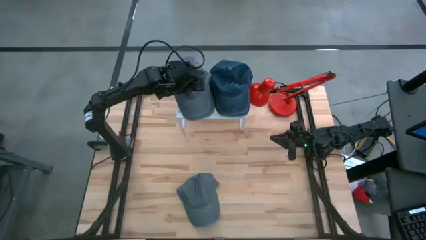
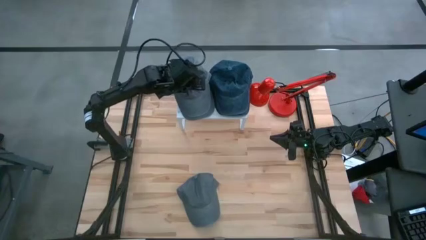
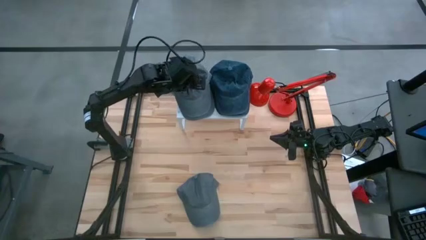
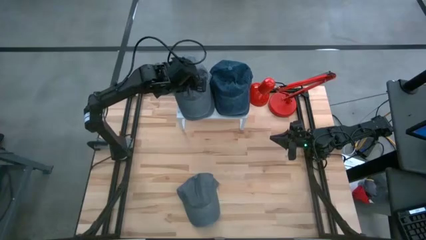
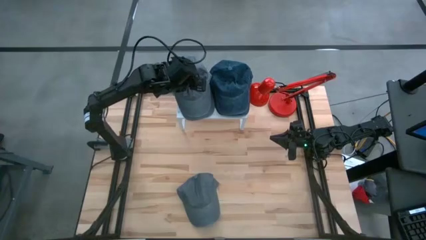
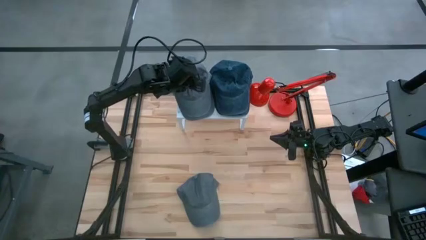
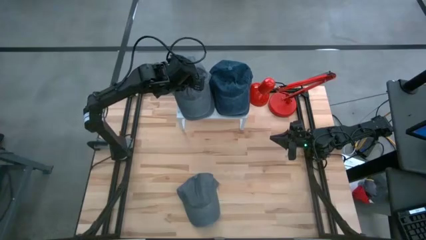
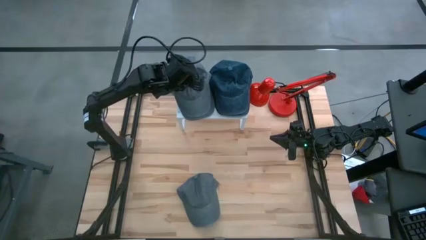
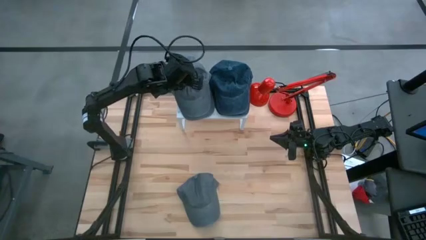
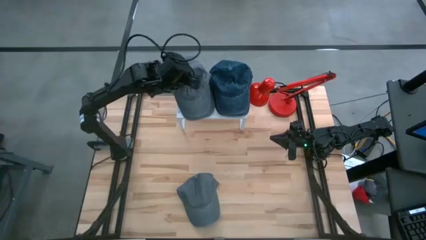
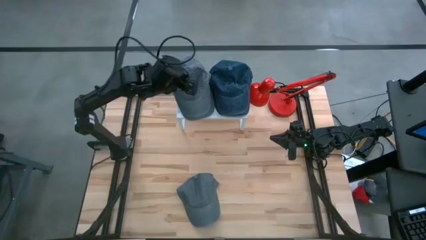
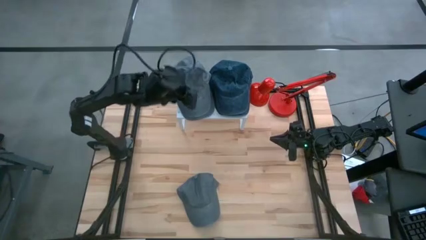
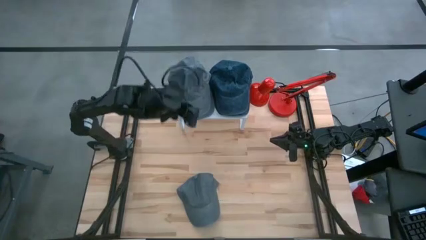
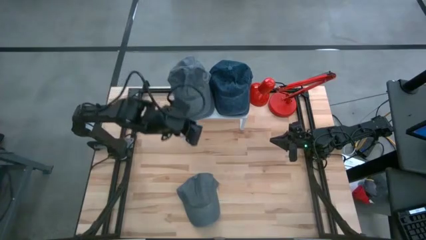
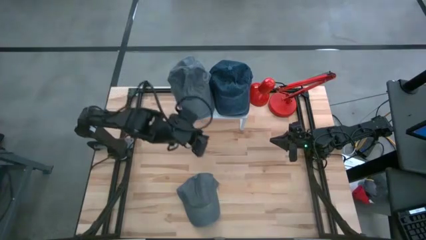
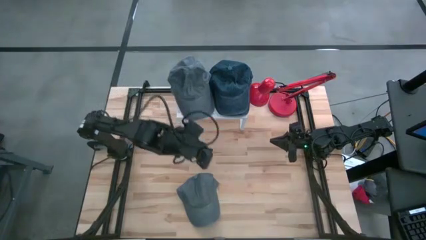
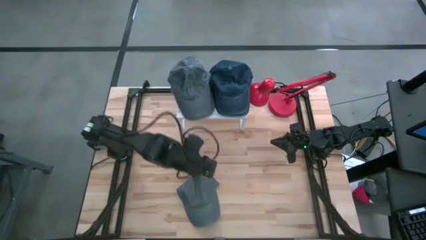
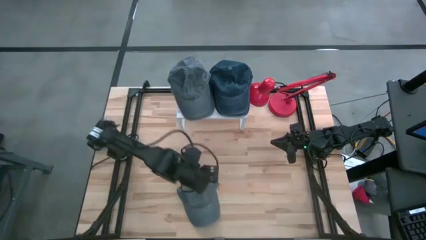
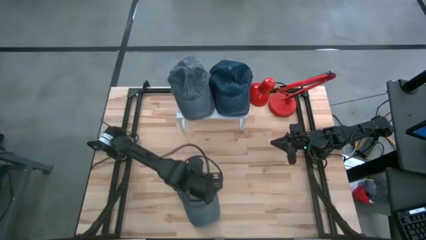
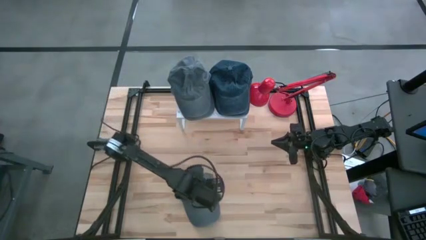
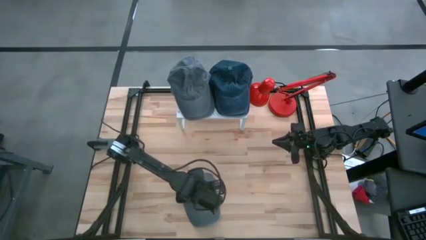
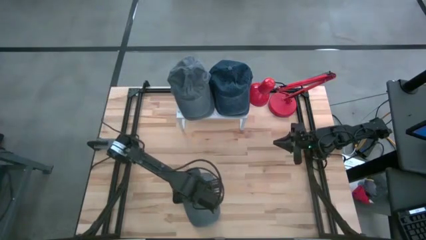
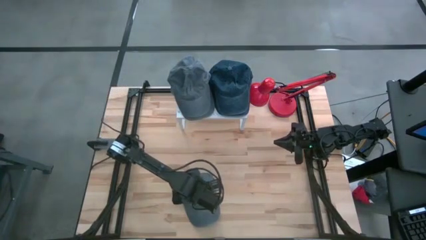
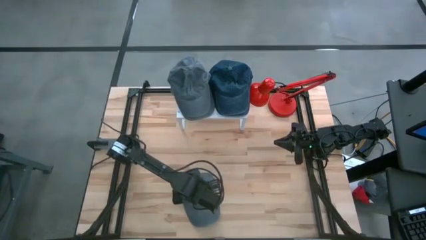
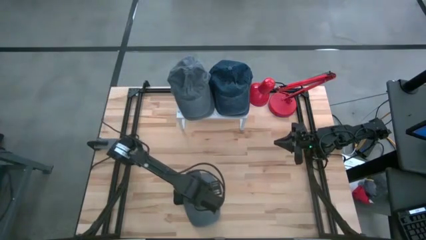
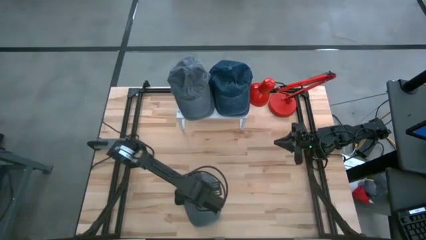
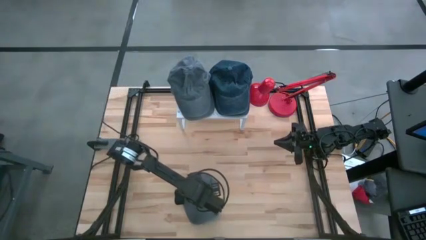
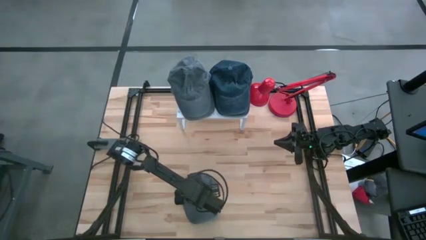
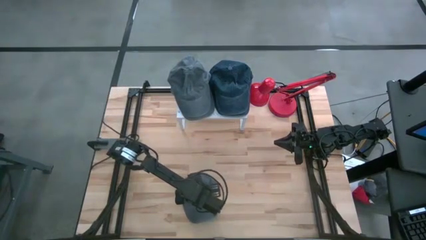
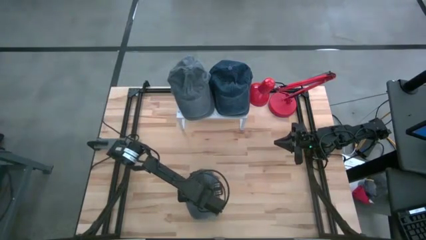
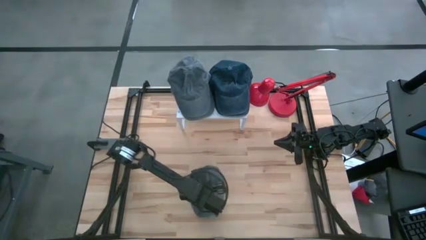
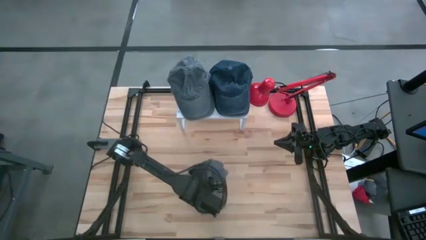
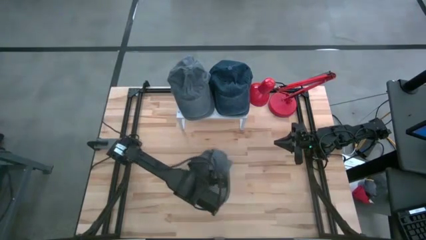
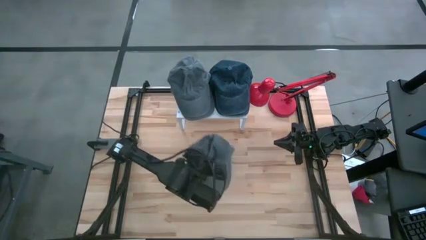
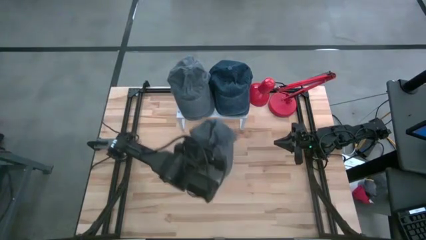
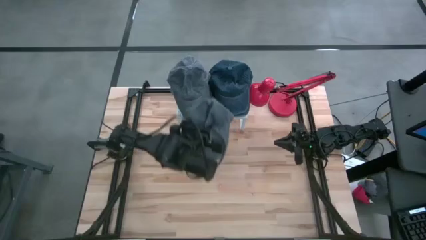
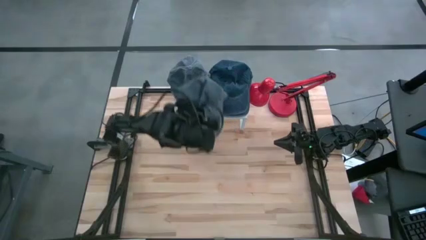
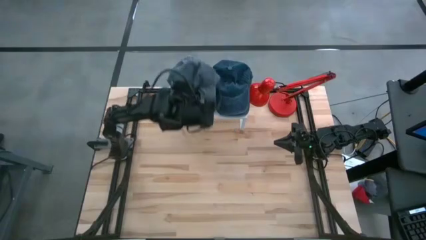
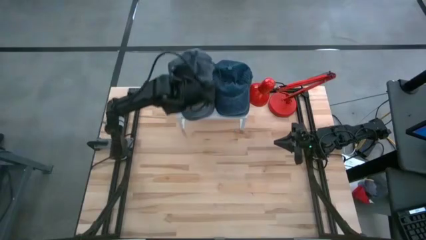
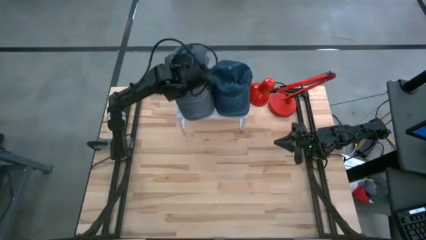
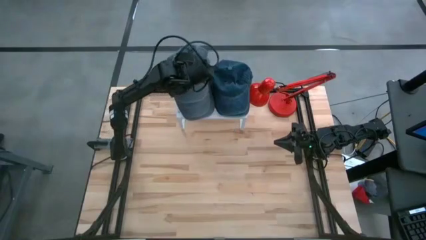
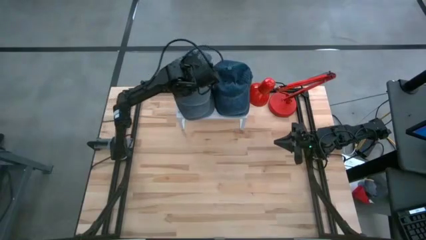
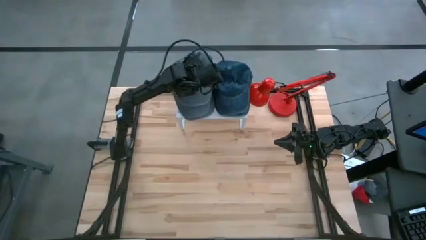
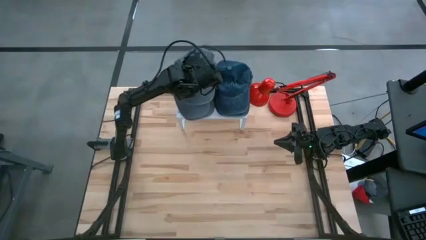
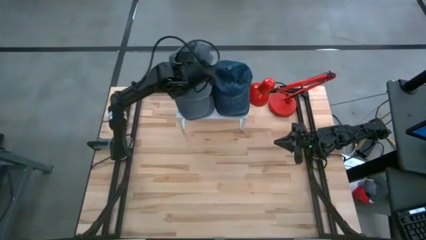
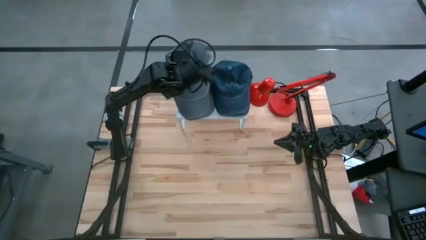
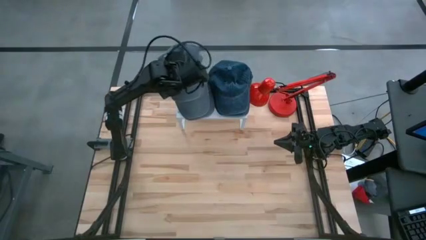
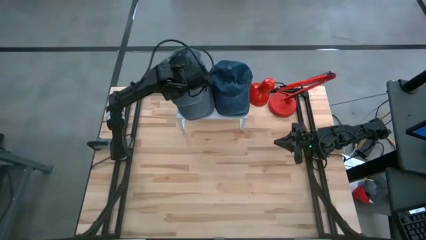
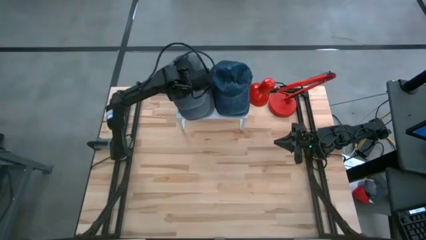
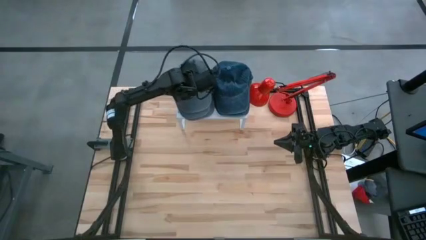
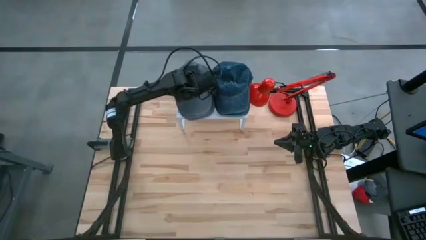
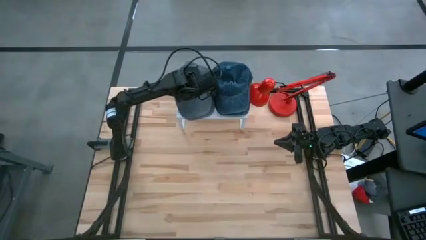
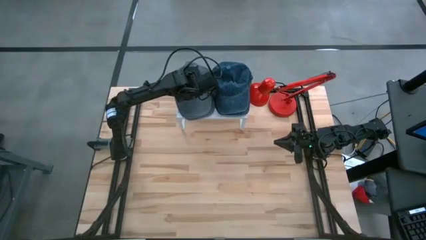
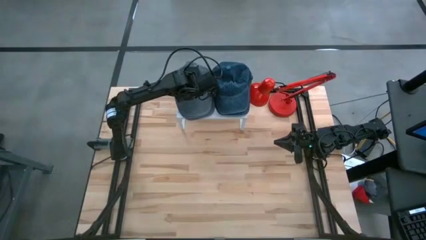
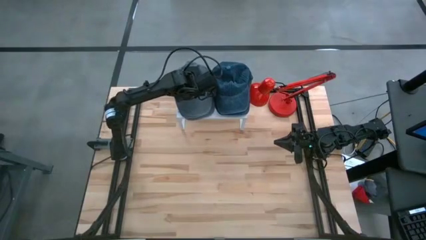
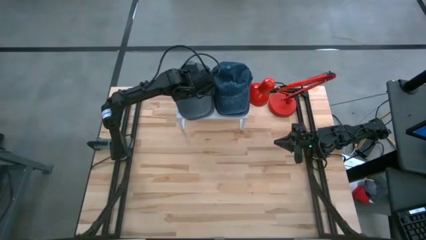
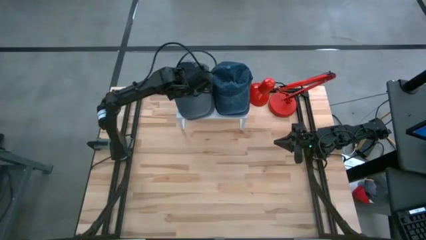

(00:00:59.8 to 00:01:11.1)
Task: Pick & Place hat
Put the gray cap on top of the other gray cap on the shelf

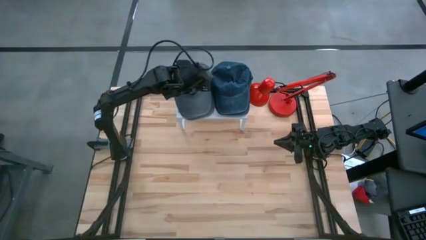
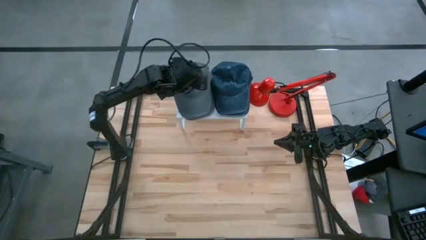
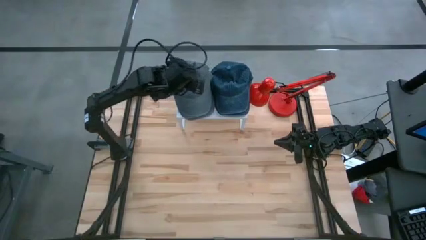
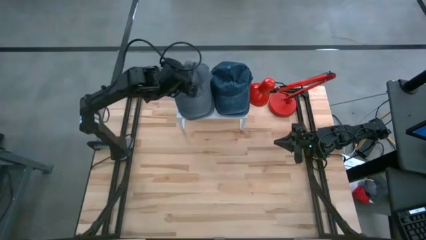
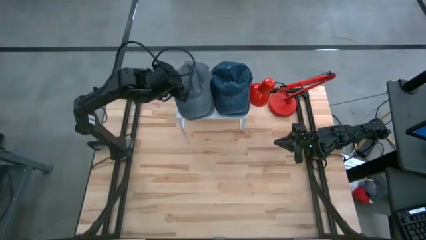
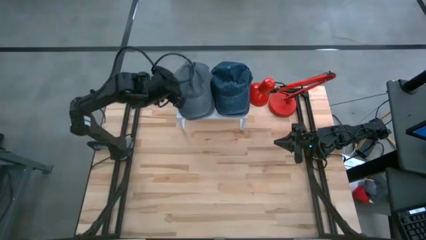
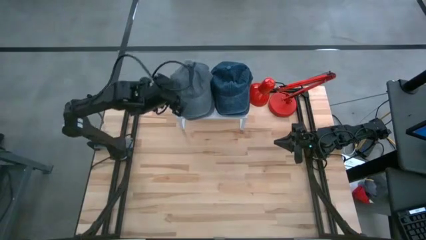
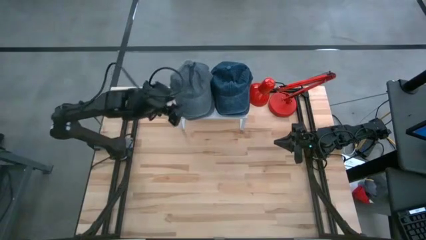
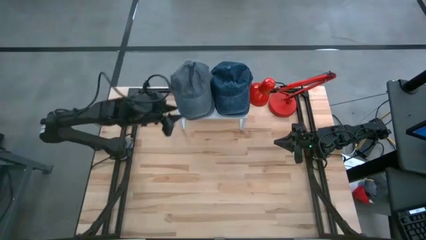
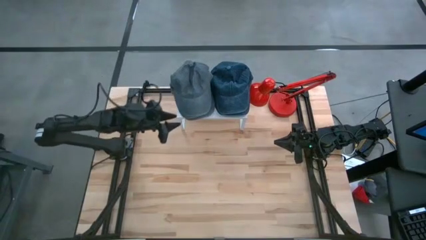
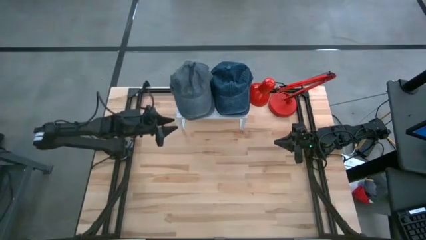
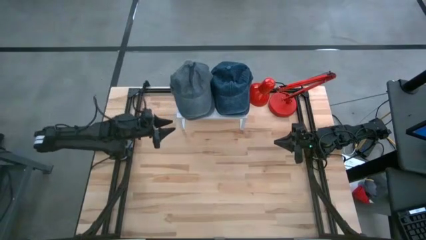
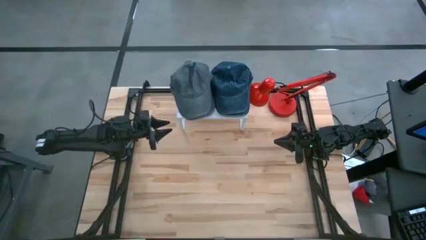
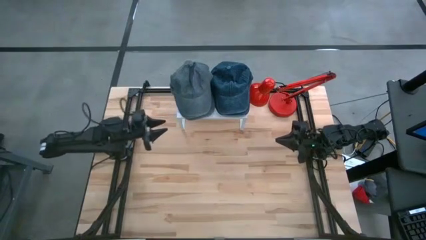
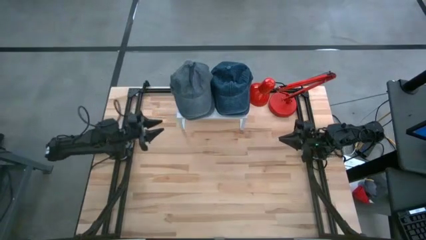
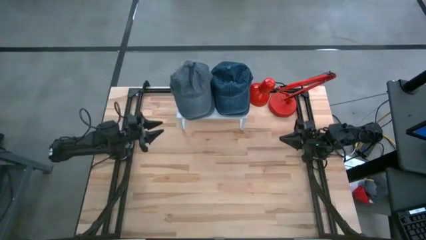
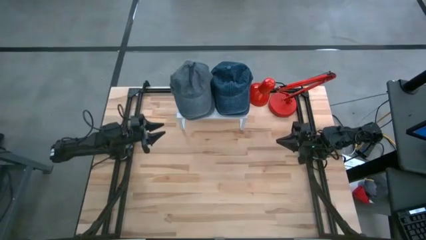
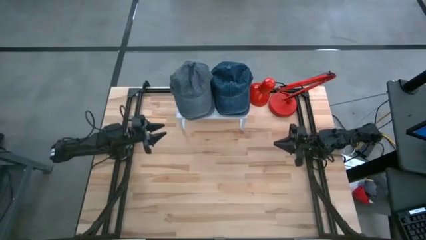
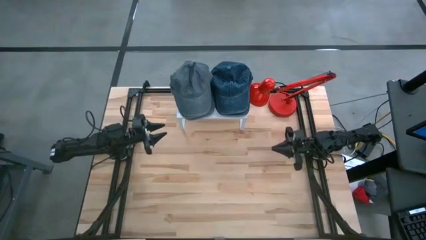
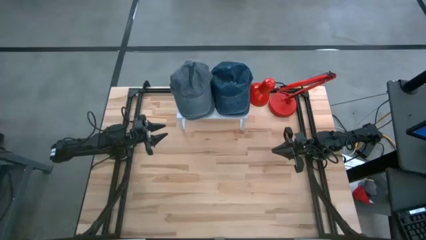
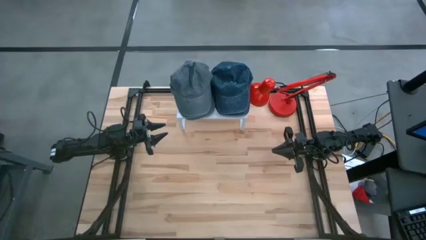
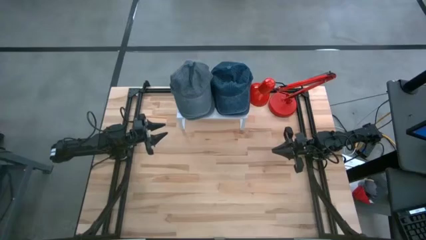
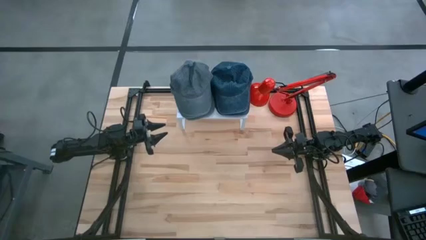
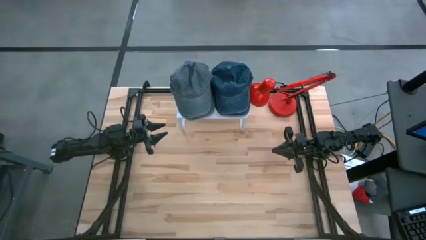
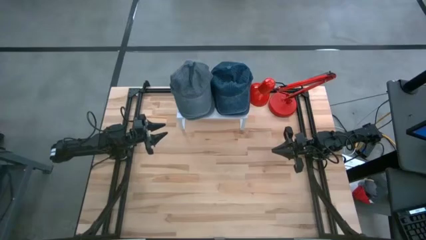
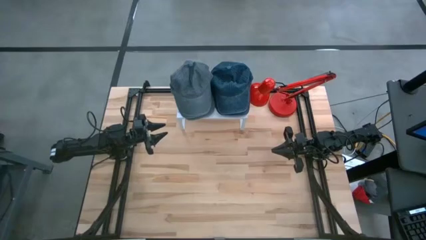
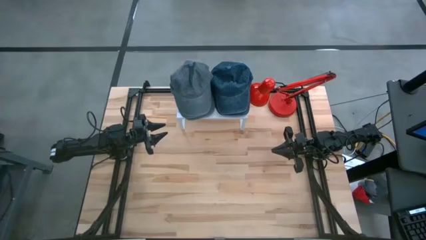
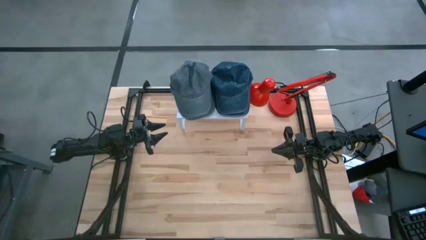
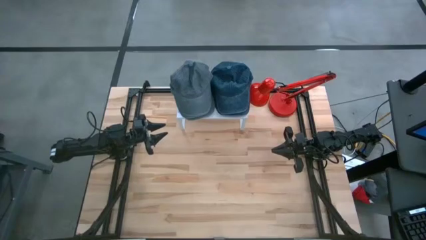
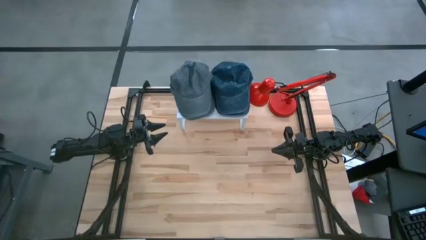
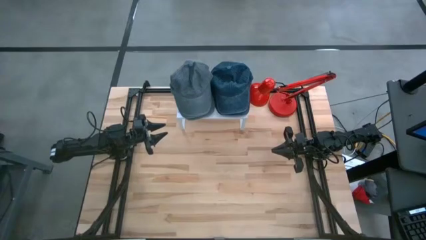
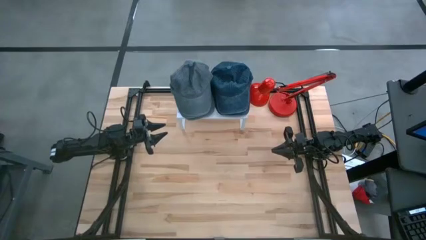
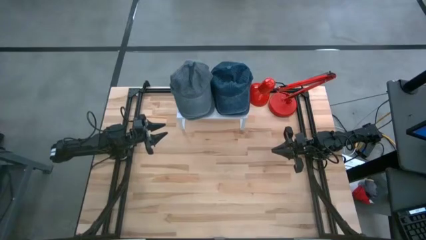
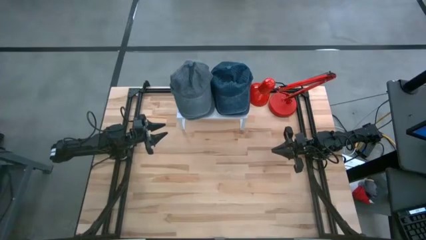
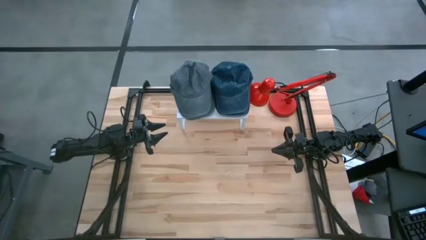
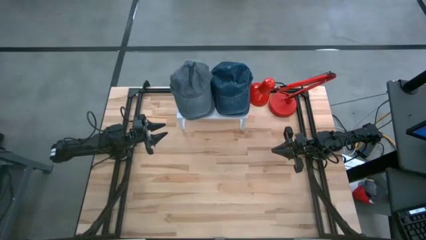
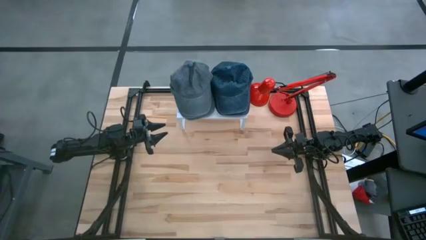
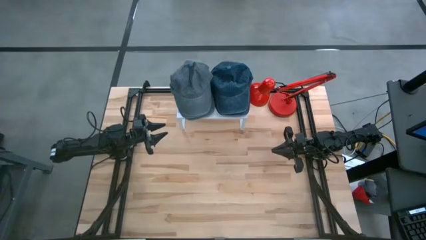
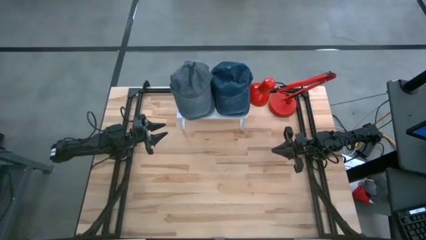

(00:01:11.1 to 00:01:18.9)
Return to home position
